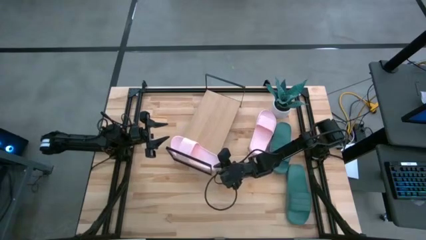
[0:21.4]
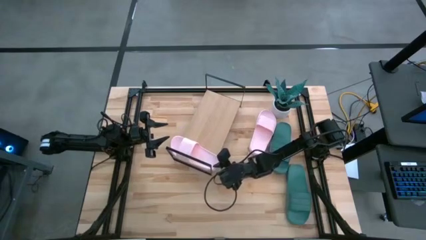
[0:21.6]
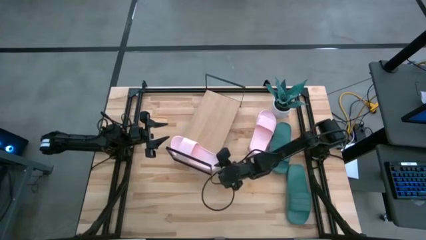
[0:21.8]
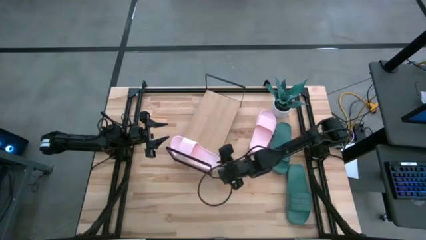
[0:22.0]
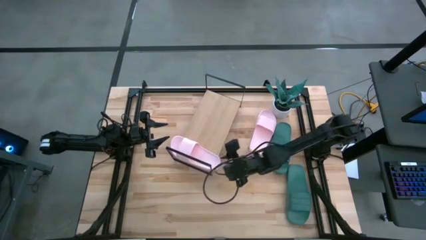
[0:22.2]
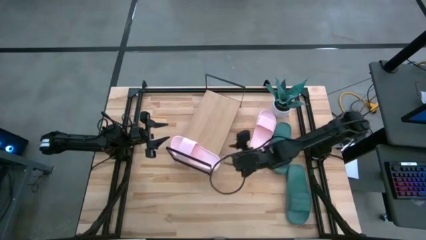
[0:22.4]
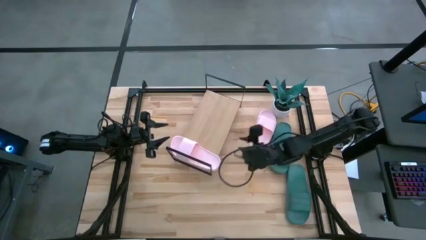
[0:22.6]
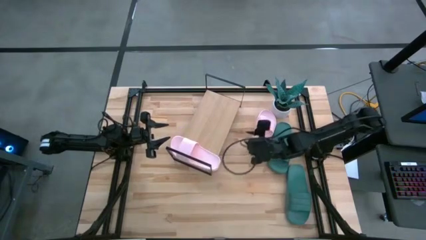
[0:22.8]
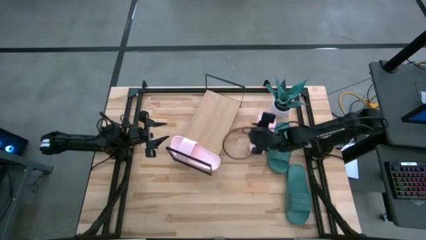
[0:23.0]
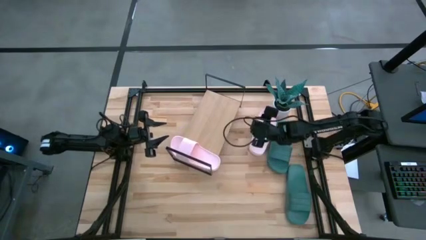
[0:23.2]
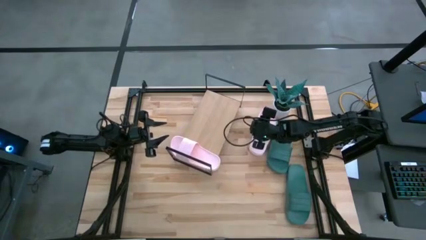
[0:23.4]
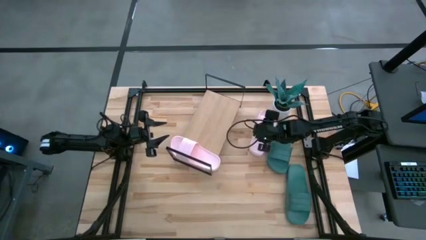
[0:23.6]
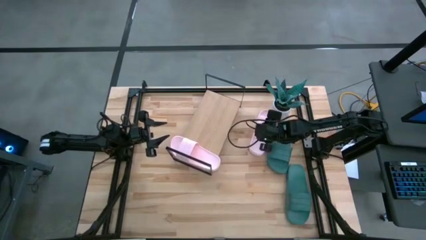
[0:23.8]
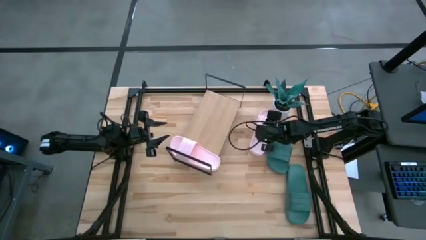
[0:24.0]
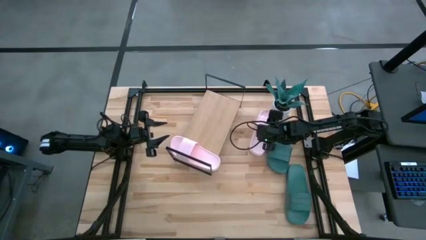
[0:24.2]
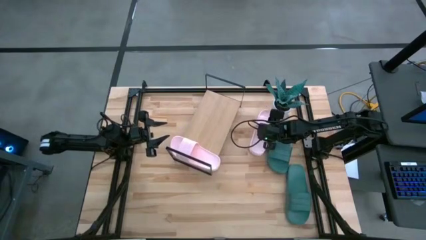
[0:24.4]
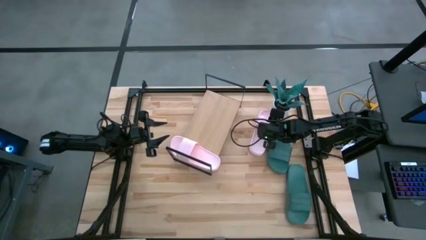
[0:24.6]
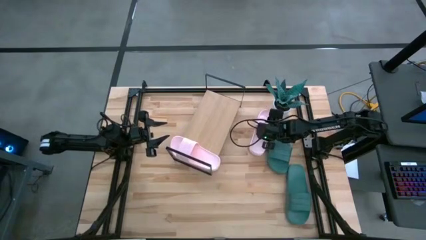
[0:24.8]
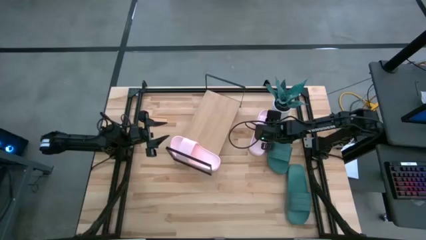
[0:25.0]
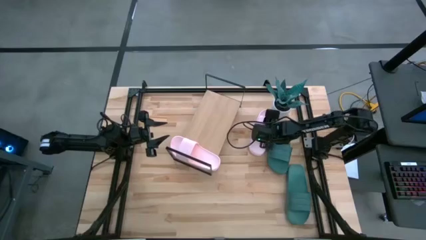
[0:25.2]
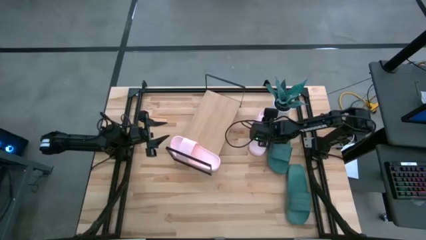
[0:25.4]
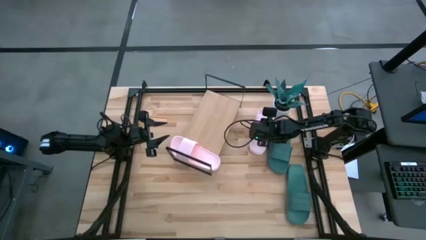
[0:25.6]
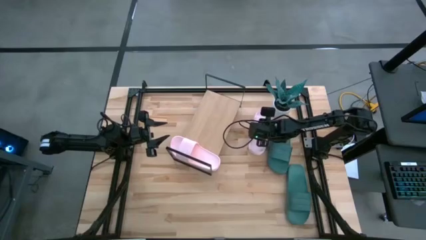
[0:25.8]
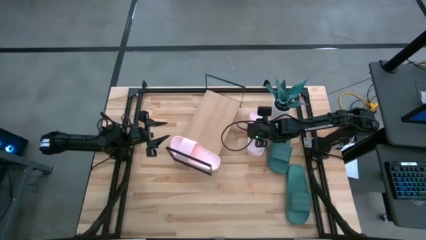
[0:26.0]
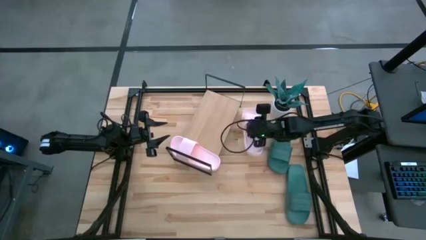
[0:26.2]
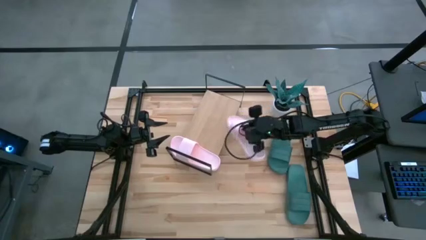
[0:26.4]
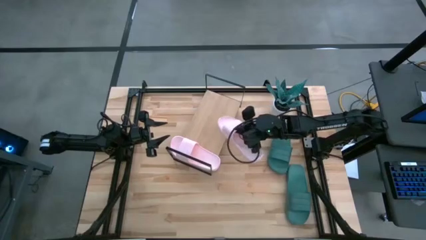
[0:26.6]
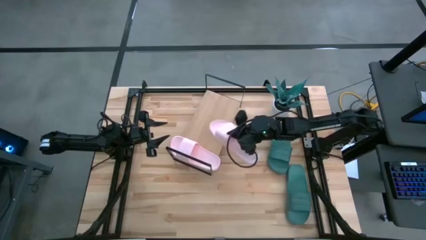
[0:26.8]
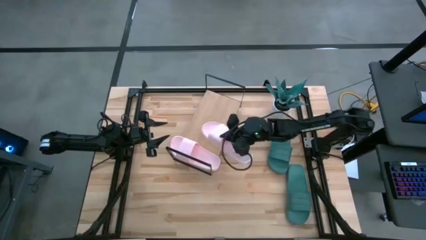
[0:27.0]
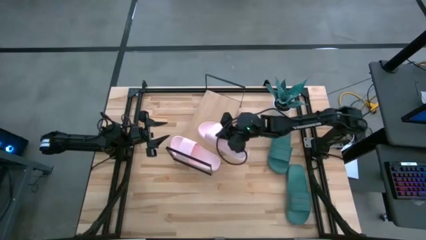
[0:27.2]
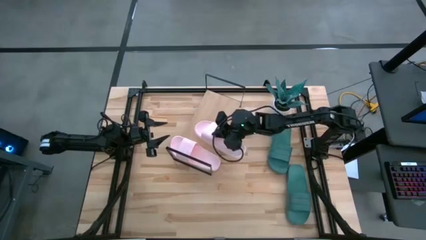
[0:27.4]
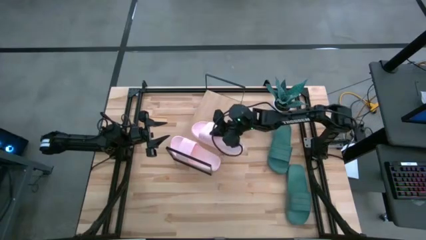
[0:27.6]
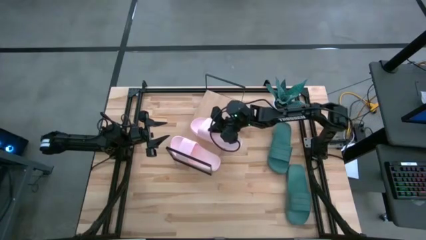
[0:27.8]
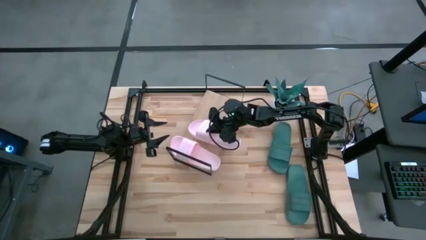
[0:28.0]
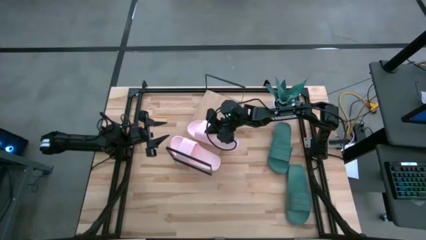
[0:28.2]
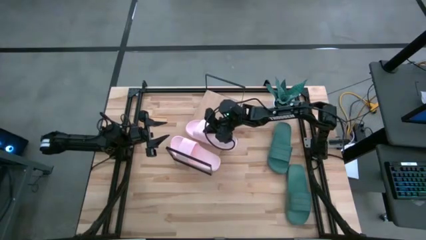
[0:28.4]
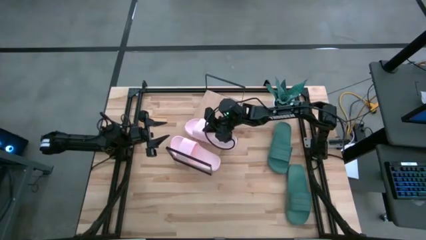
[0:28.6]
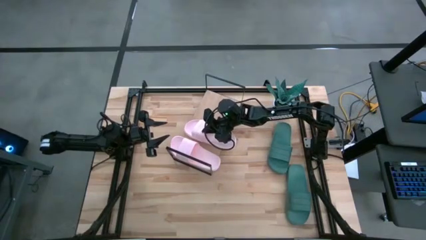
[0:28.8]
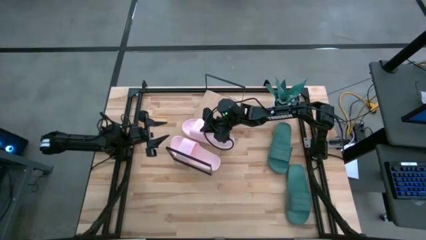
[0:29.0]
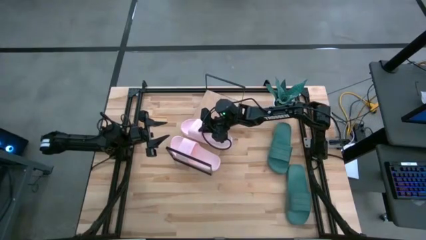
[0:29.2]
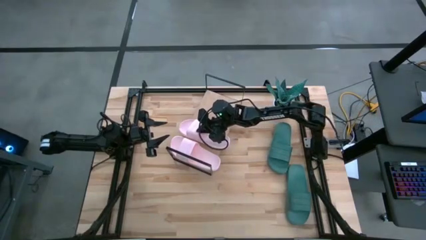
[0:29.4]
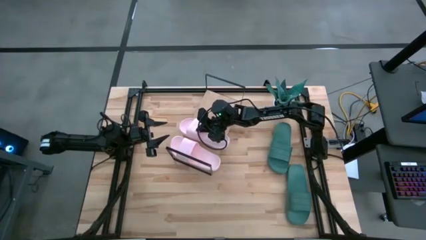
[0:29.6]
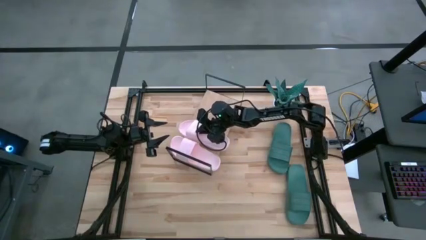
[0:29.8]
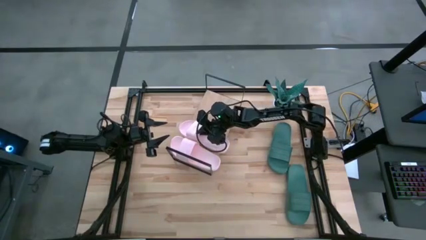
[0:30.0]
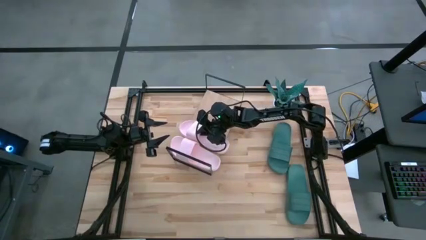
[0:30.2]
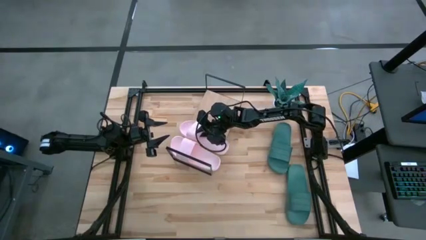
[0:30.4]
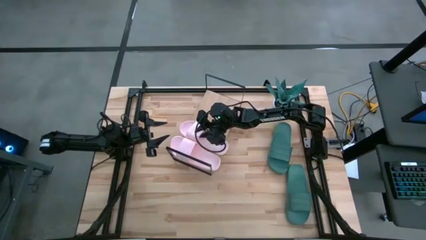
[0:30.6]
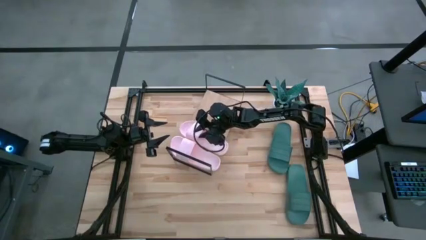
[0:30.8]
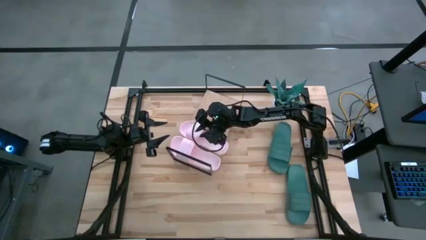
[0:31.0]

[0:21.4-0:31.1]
Task: Pick and place slides into the shelf
Put the pink slide on the shelf

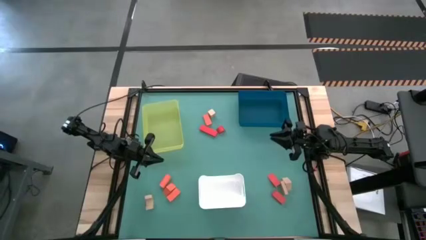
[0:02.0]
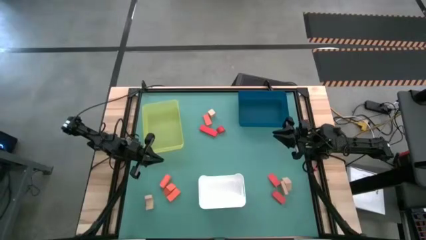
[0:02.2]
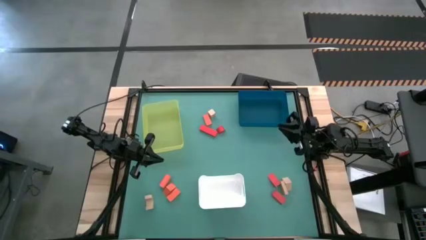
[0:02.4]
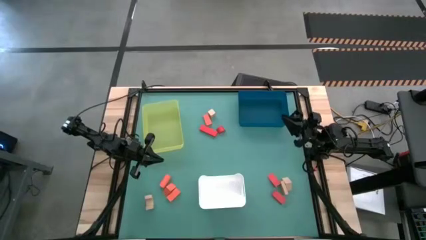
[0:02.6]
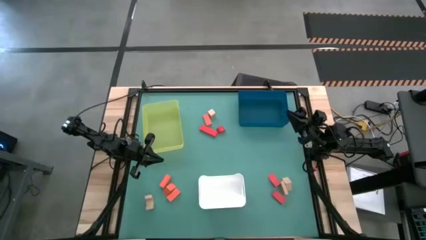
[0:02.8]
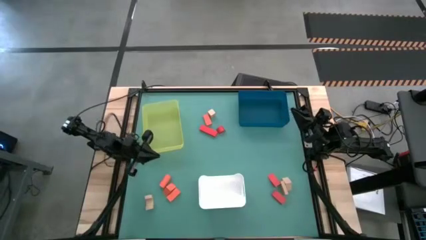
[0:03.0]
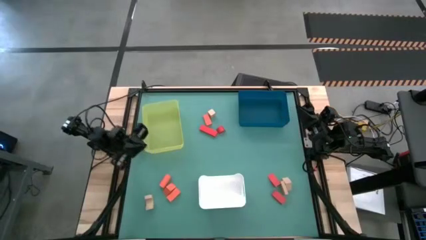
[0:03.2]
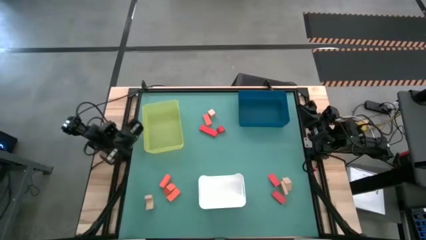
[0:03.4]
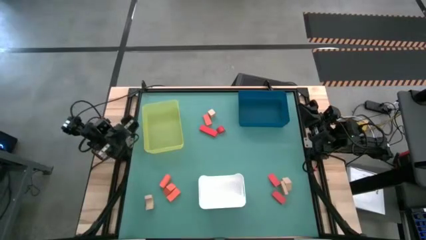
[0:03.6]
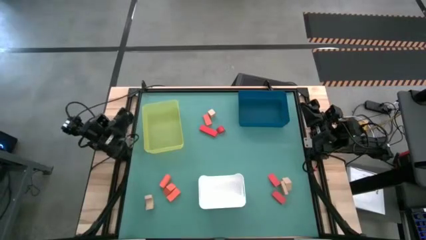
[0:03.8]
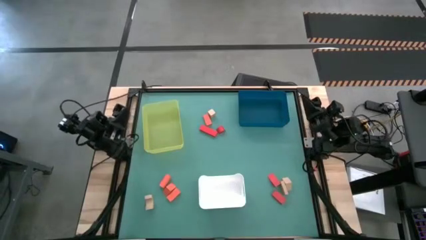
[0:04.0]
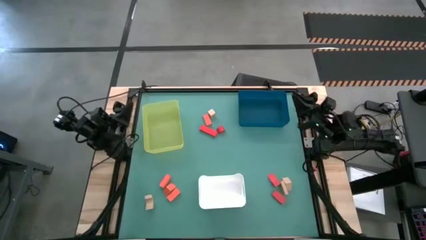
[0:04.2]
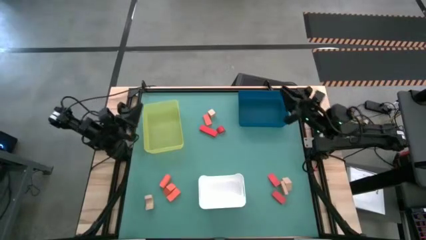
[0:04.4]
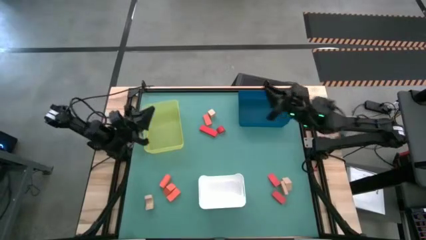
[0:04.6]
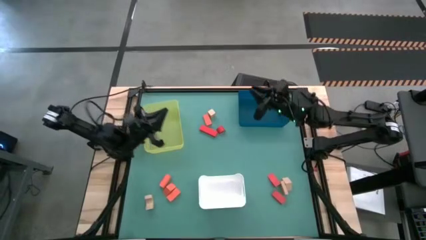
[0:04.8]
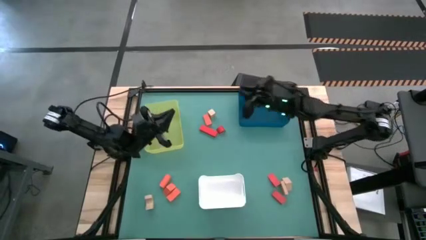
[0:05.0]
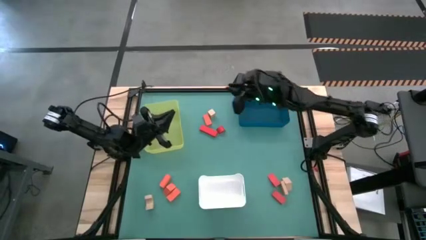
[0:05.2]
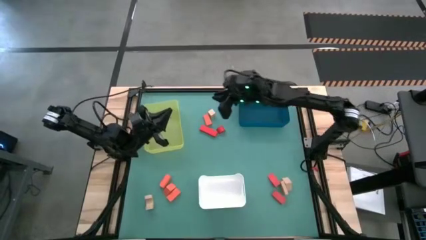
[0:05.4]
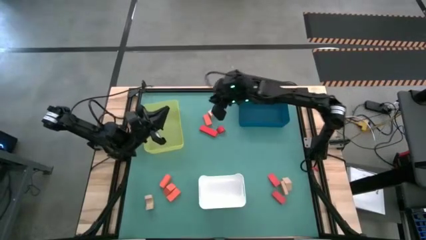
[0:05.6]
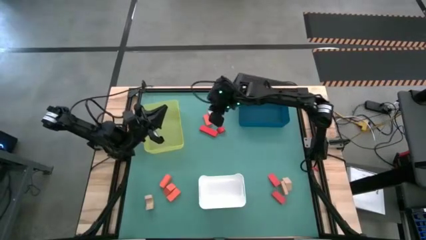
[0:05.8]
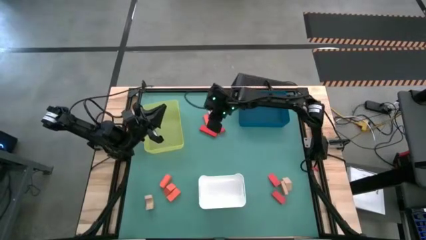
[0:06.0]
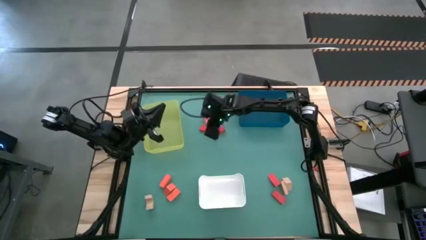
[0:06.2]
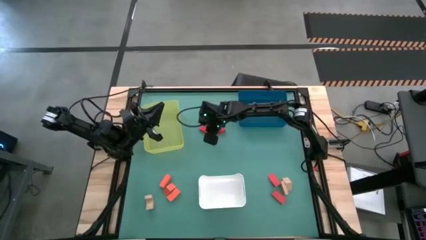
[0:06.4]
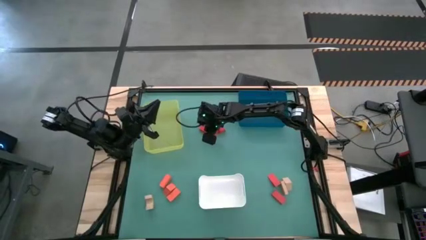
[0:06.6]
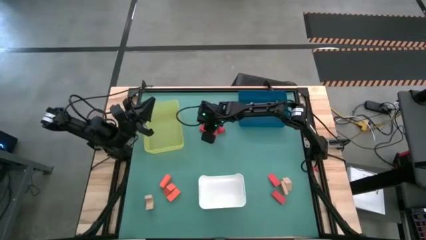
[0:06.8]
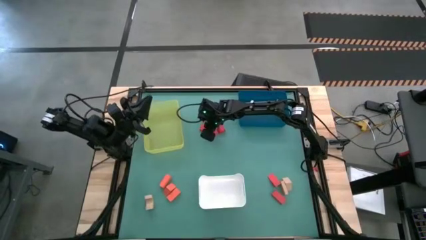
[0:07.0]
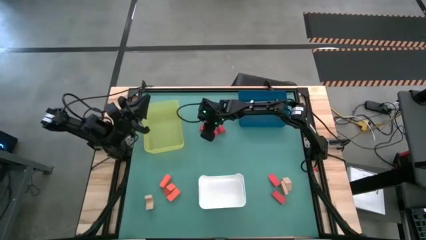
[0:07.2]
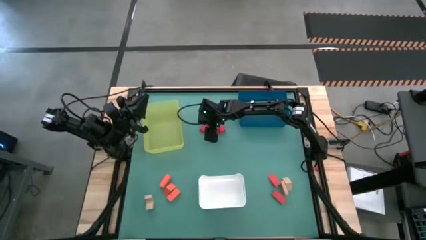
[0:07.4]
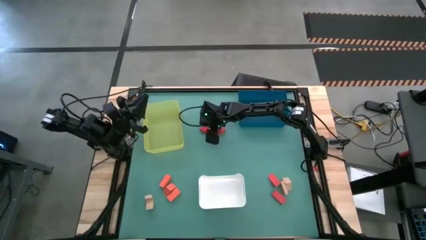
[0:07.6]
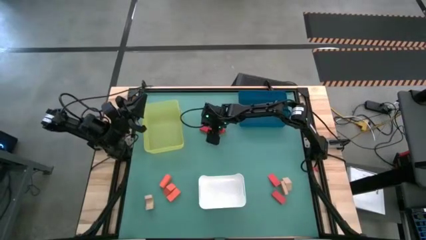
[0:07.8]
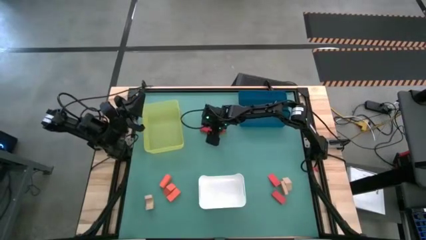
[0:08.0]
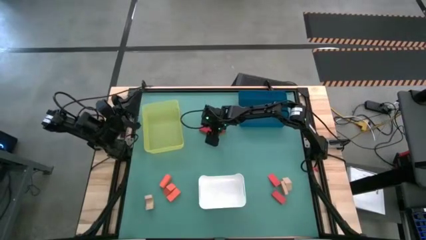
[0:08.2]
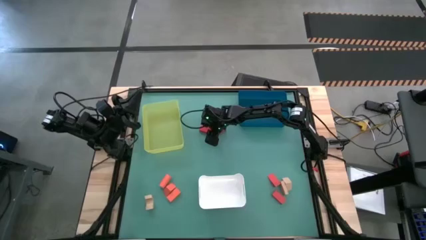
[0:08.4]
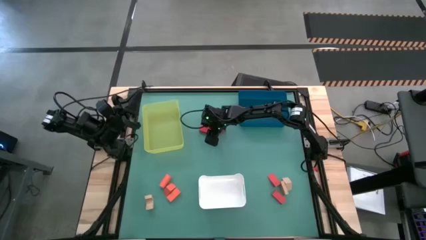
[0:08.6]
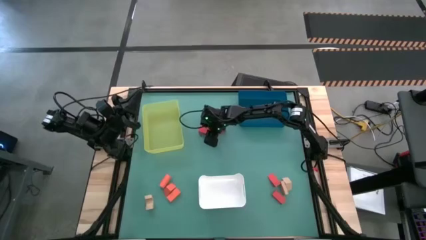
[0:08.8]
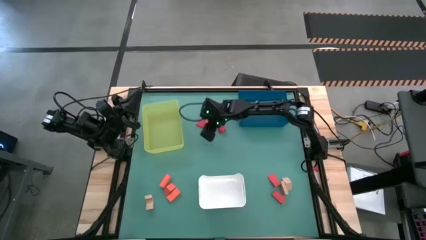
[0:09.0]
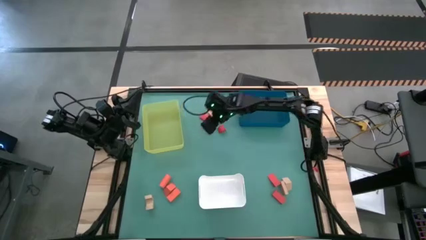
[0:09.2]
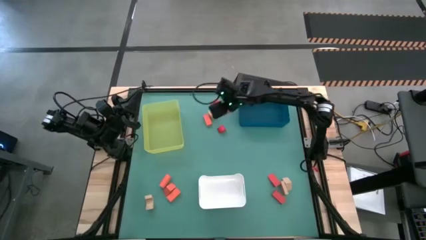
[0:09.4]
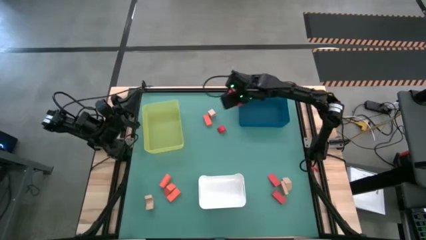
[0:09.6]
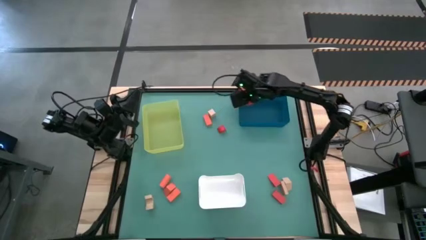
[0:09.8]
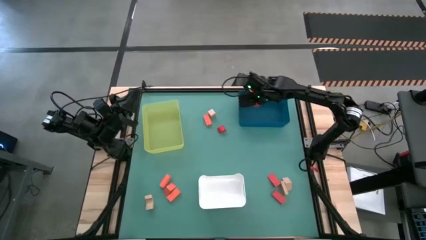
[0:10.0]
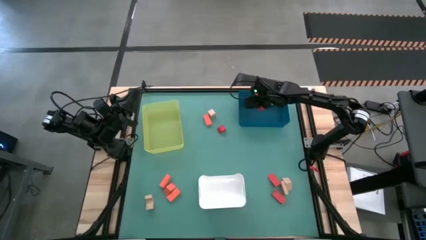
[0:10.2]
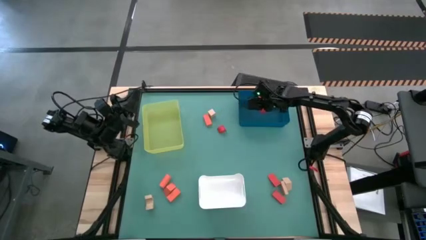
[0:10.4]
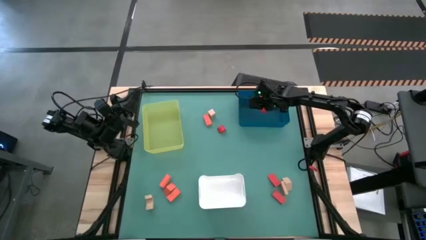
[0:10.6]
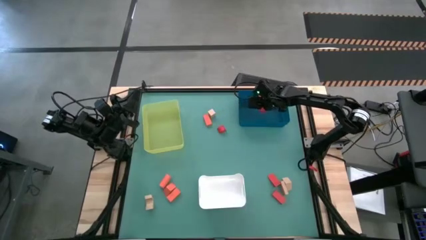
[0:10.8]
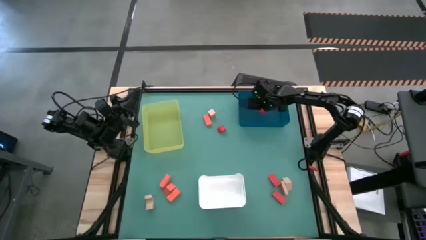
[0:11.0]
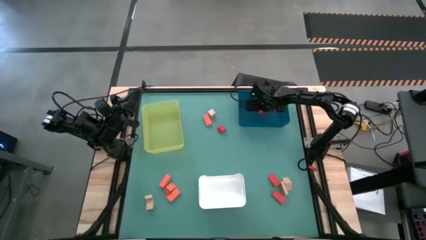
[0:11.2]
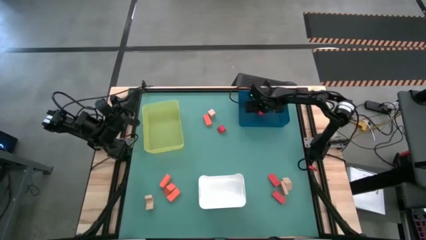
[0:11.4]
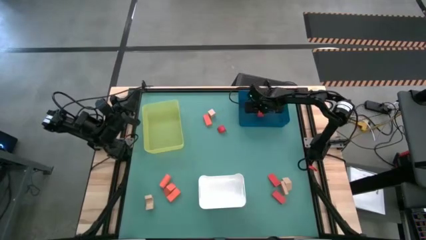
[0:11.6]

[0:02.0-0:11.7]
Task: Sort & place blocks by color
Put the red block into the blue bin
